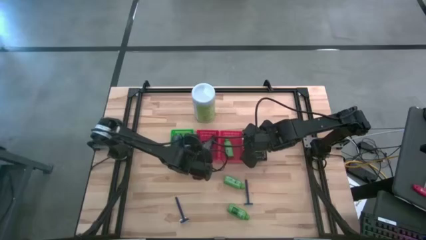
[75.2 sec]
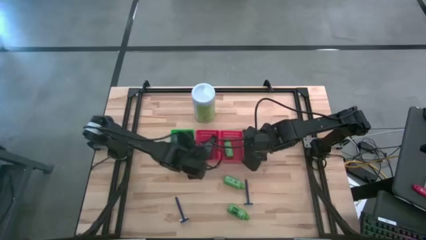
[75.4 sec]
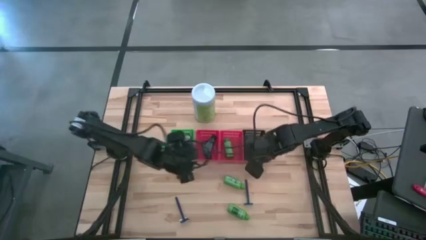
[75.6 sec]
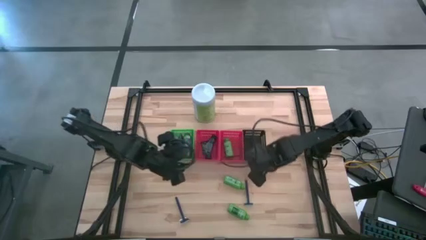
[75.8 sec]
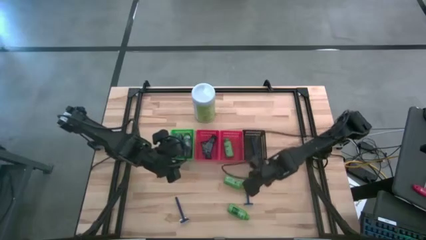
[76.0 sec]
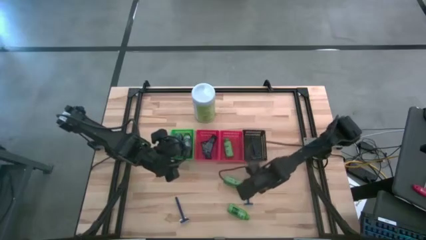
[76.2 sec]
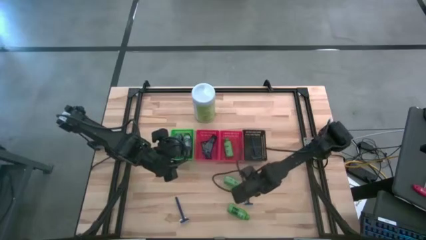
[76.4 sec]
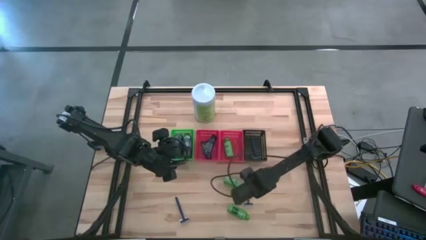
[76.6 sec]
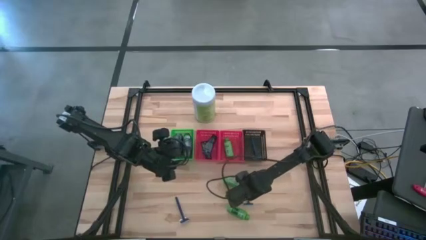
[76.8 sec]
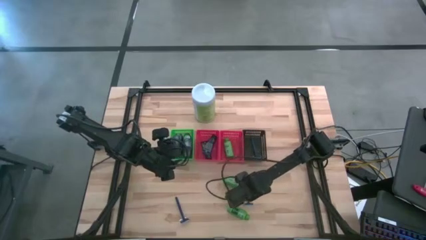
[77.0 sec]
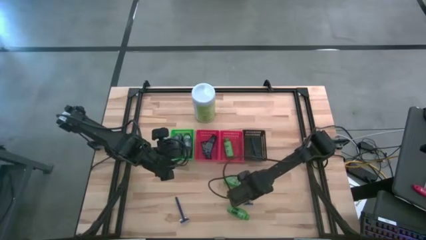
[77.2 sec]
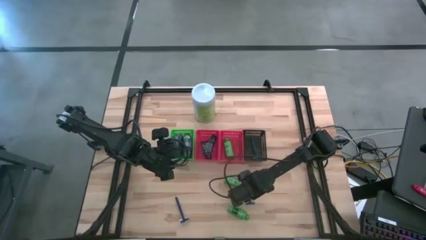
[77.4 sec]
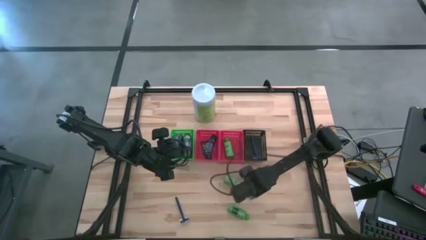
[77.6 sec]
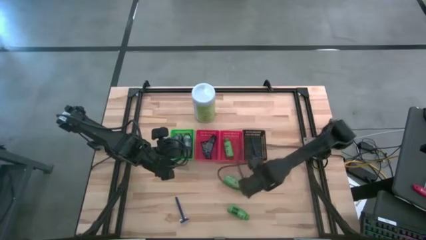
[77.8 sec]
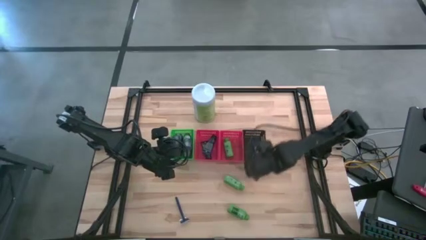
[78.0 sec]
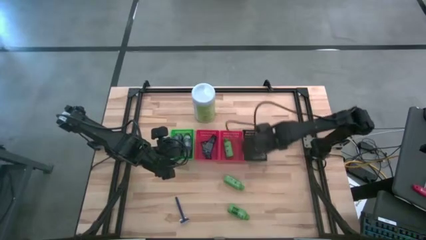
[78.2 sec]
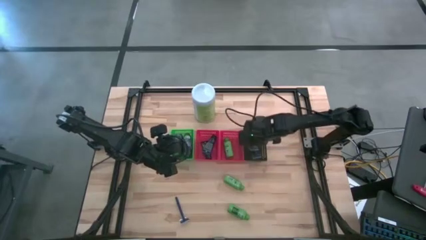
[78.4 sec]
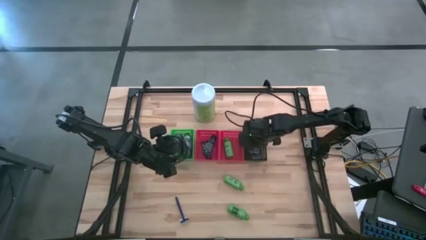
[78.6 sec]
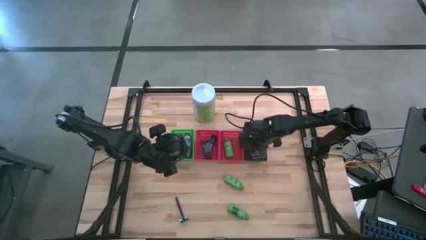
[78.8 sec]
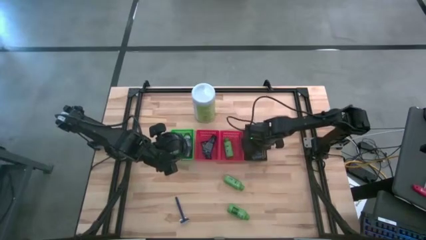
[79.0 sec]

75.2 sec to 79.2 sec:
Task: Pick & Place Travel size toiletries
Put the blue razor in the black bin

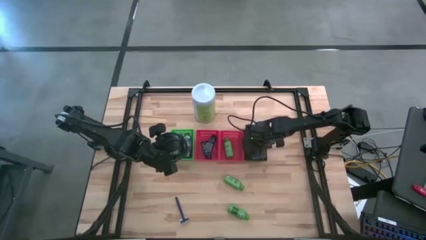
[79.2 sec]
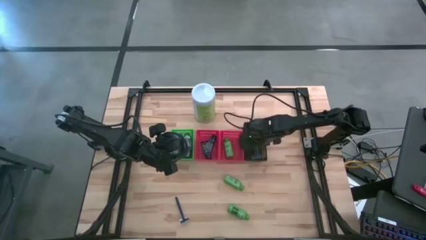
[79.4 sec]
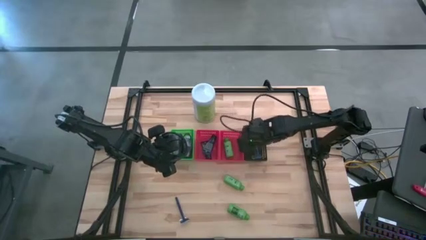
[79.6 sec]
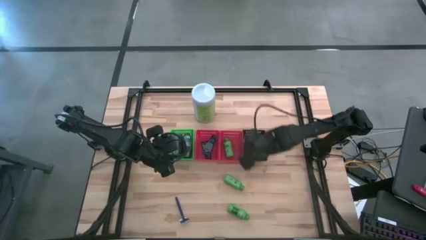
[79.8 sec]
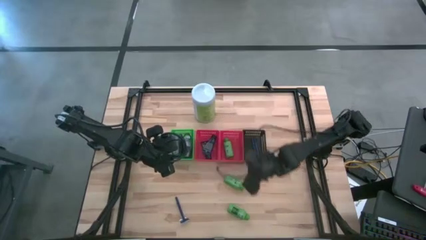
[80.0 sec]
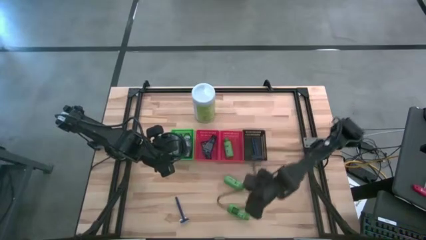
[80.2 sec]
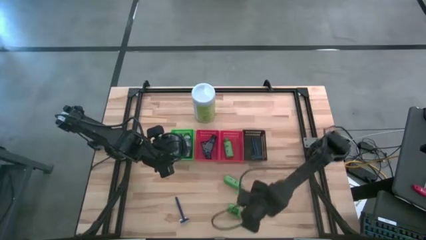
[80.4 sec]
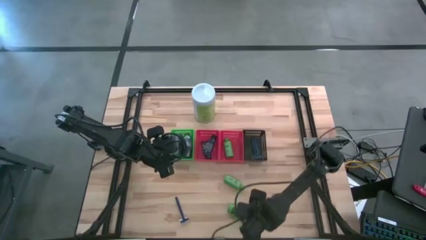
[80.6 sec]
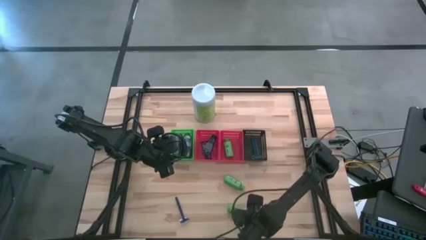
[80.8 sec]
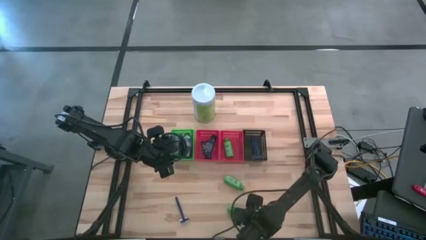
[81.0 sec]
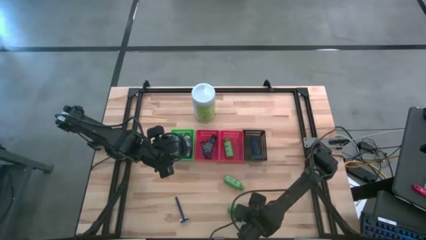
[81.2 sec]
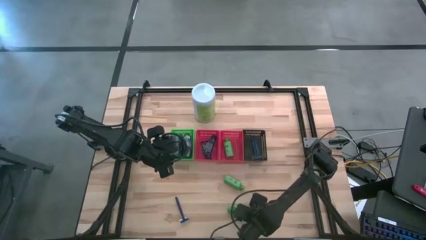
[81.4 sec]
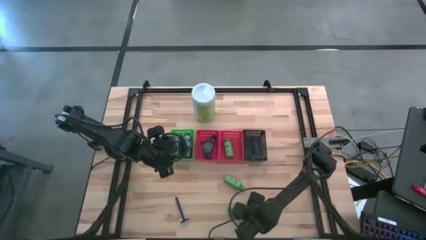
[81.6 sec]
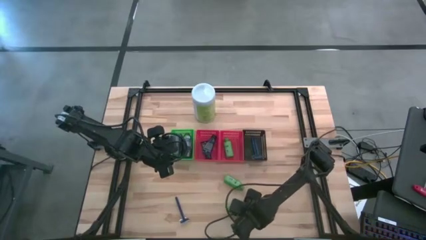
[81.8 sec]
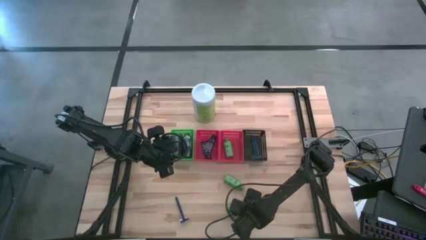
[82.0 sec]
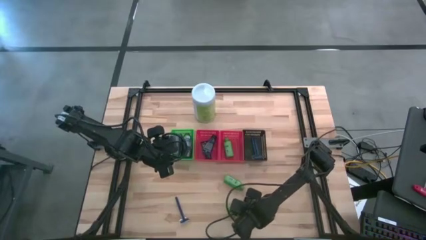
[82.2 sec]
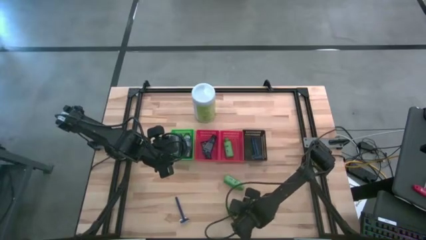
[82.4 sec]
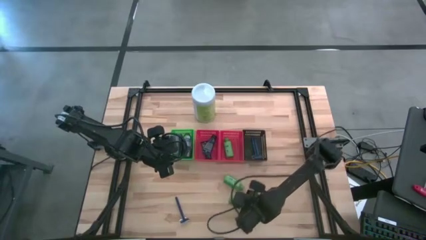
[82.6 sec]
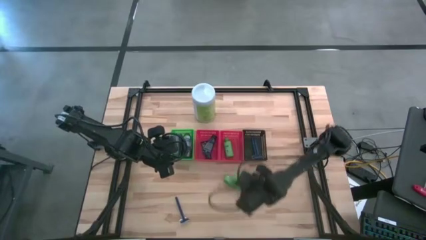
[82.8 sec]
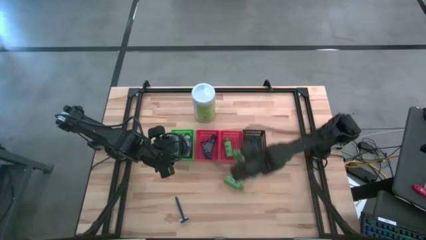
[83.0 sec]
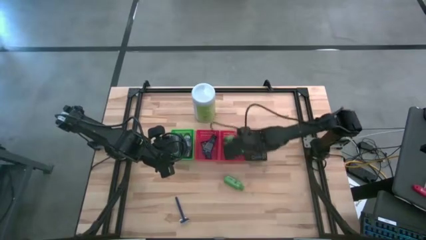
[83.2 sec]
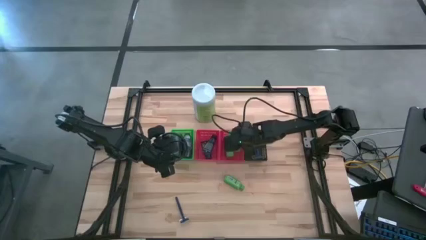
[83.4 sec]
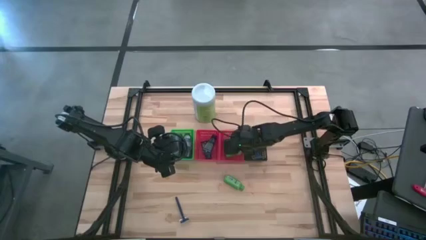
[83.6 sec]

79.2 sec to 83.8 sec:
Put the green shampoo in the right red bin

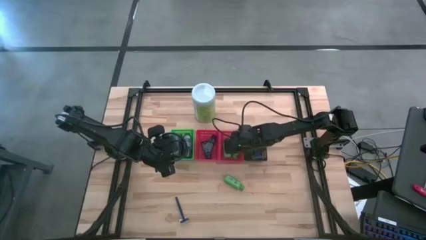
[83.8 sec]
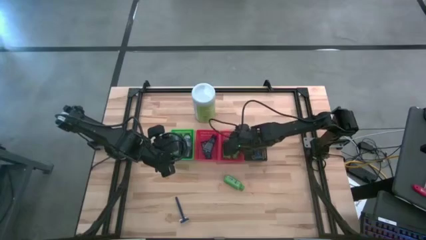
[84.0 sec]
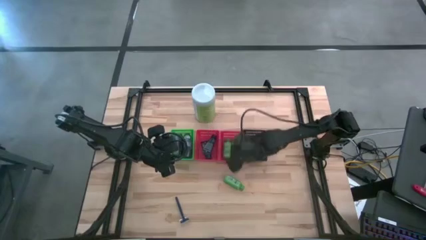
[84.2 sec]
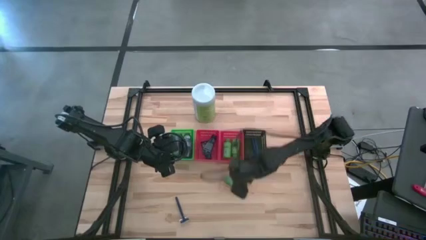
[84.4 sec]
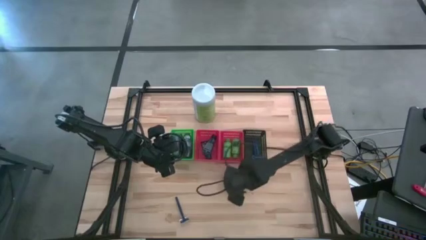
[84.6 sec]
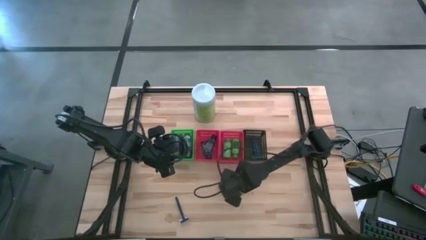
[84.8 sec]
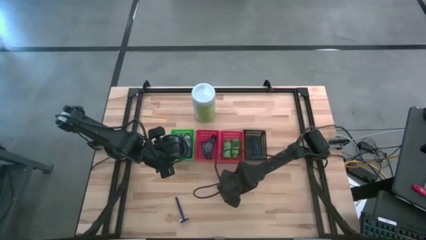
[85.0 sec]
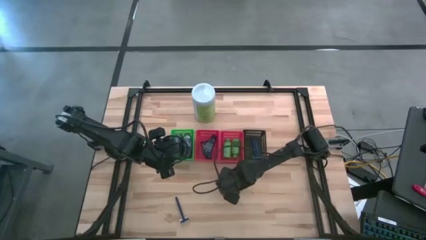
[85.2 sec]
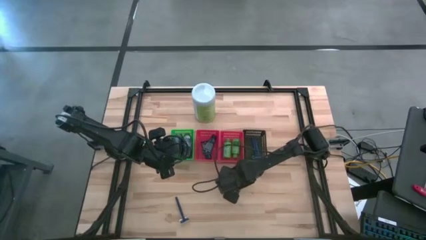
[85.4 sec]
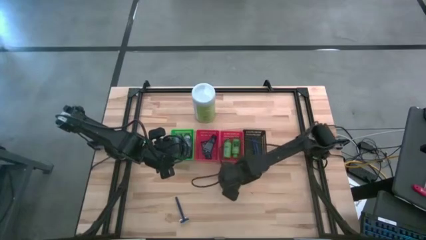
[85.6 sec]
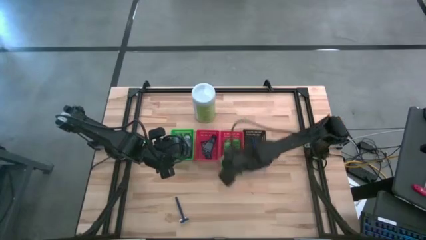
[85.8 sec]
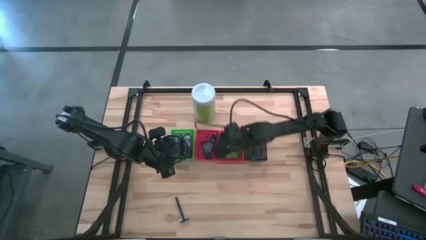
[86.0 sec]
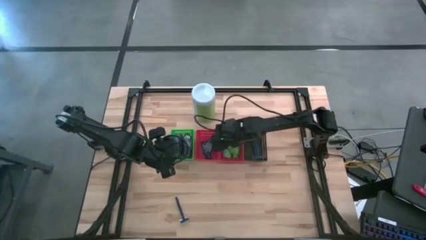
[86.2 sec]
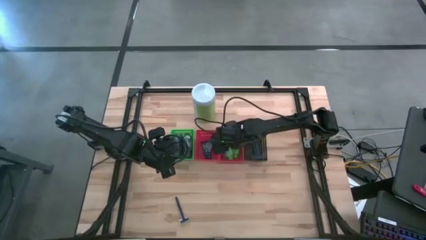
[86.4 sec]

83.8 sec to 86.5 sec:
Put the green shampoo in the right red bin

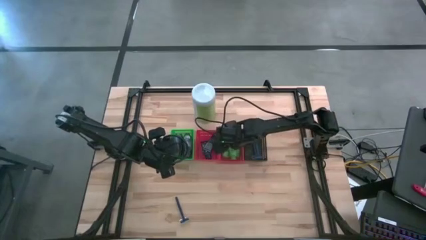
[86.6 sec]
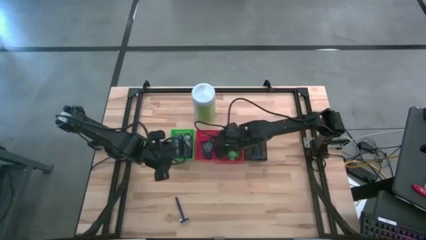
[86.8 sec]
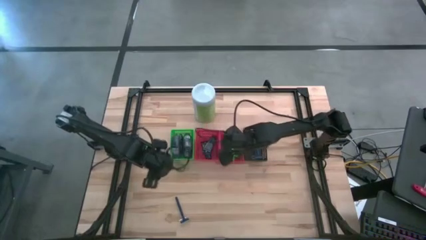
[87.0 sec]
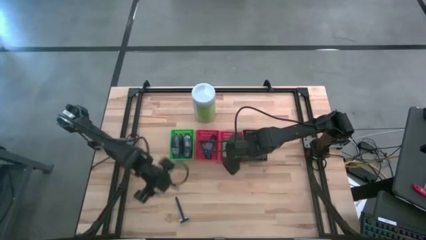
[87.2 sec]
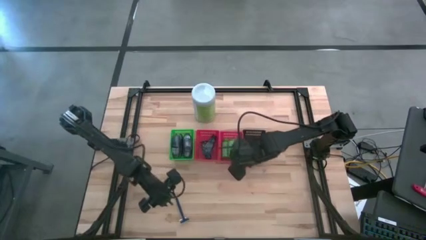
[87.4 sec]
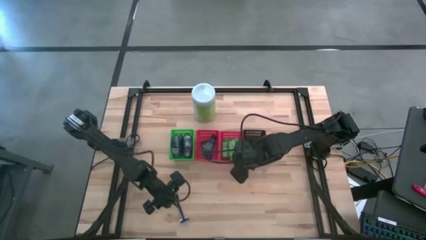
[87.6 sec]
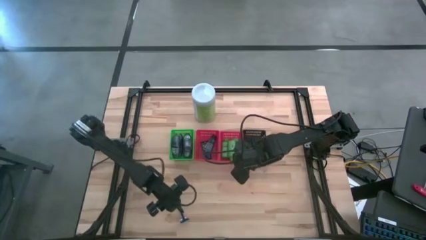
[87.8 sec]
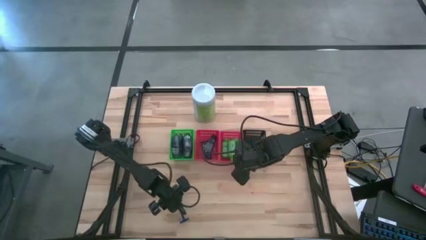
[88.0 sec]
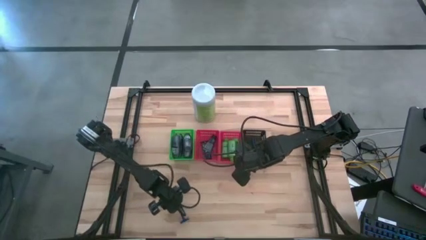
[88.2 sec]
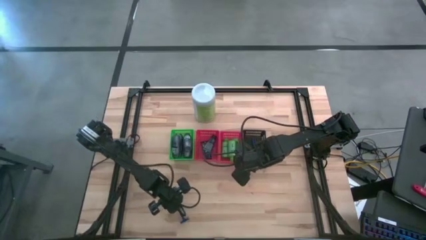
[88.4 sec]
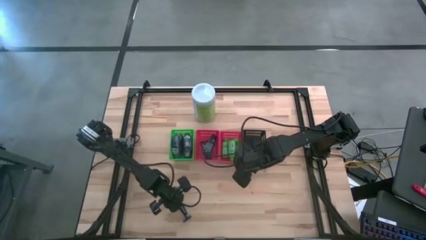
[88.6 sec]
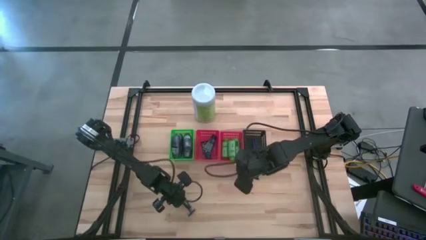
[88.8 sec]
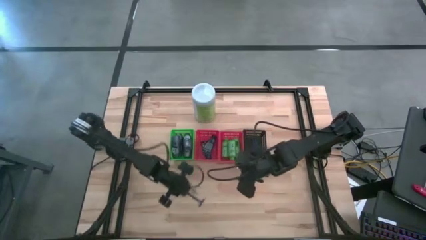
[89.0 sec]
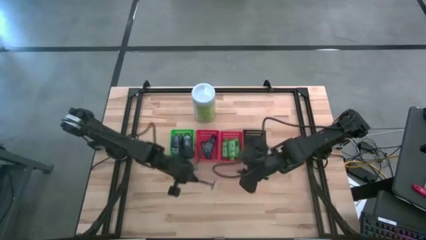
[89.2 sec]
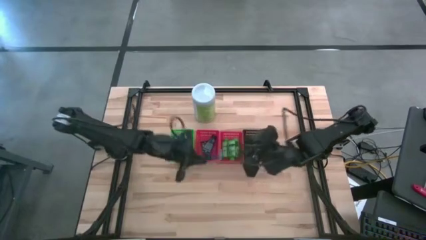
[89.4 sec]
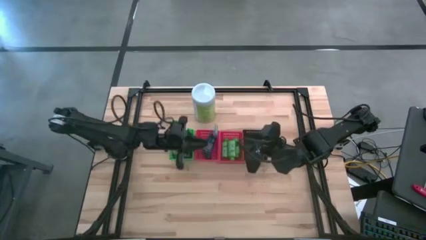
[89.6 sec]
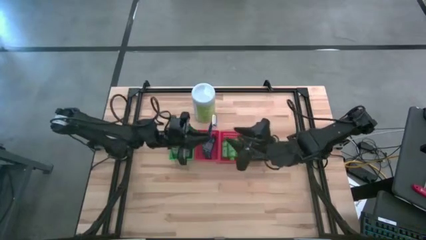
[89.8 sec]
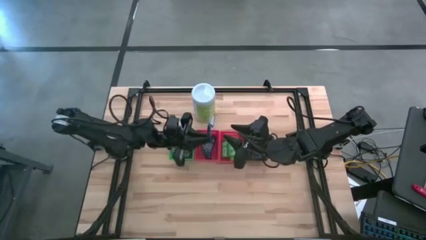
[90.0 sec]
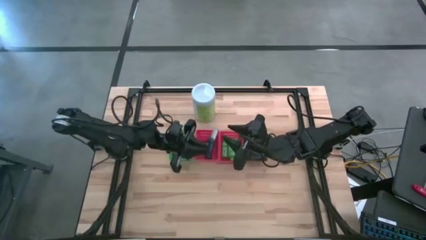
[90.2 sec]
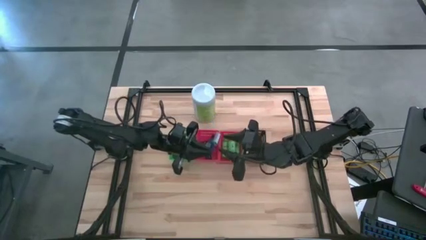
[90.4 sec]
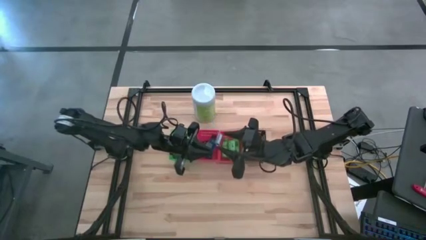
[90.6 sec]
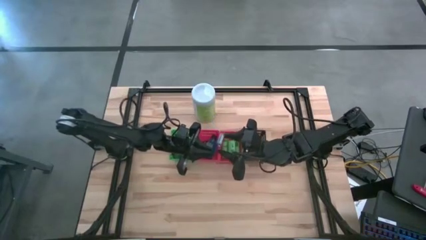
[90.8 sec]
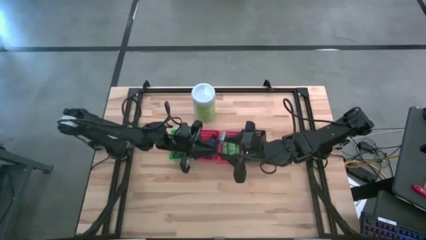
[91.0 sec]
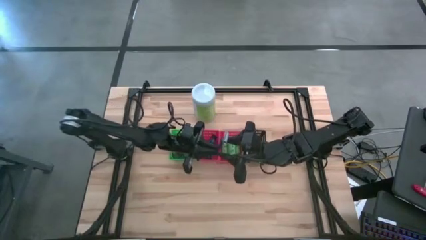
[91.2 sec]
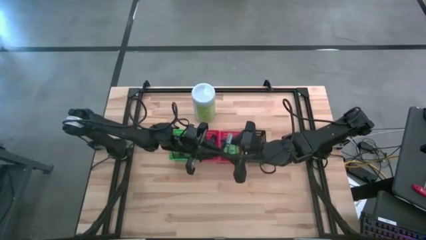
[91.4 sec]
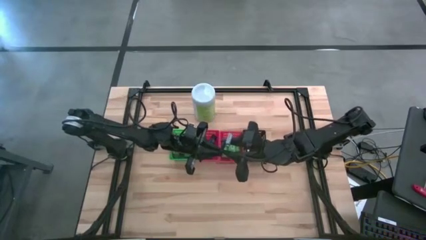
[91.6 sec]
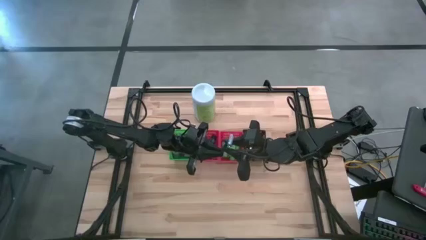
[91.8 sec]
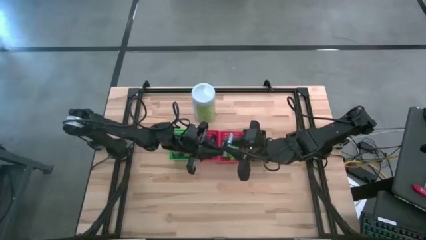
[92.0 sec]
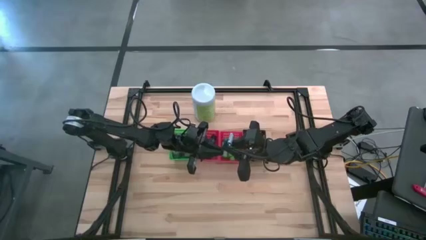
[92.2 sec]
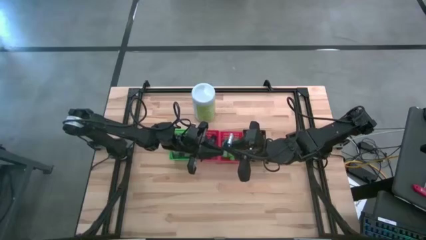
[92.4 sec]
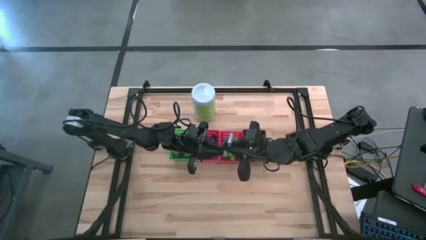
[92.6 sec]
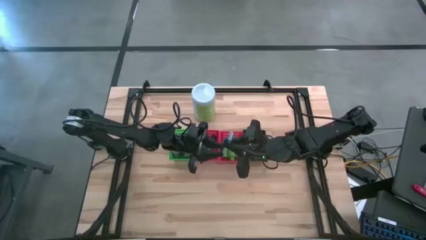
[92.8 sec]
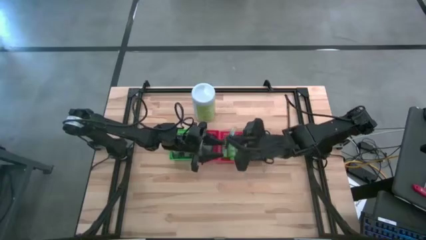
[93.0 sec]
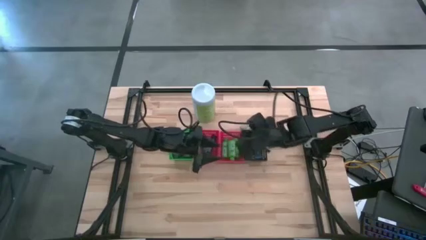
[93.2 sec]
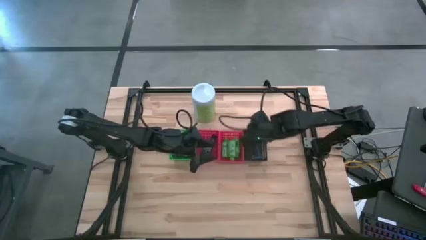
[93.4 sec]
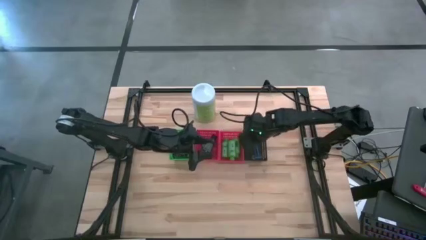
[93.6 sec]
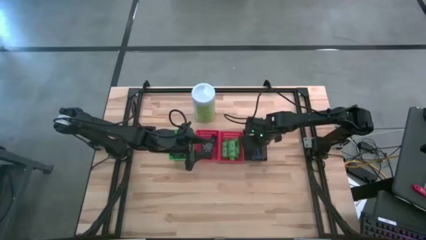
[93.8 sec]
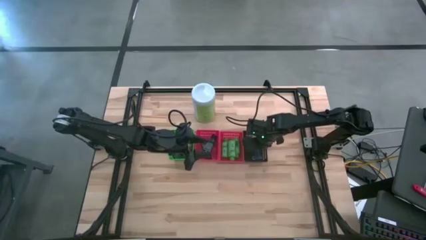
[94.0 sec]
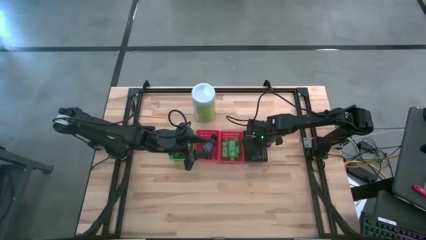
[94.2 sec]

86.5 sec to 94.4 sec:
Put the blue razor in the black bin
